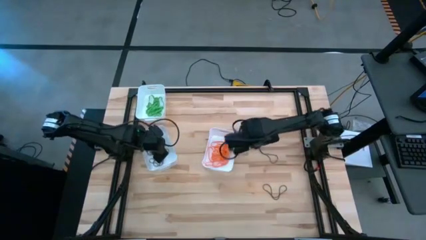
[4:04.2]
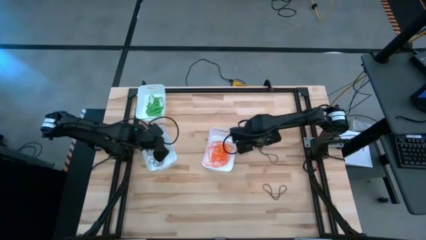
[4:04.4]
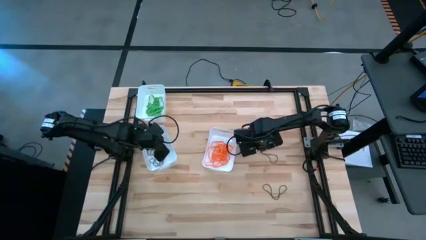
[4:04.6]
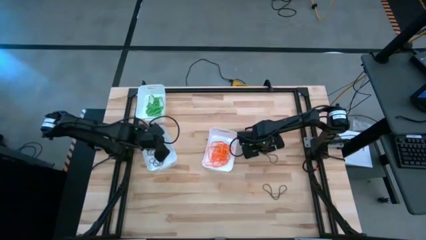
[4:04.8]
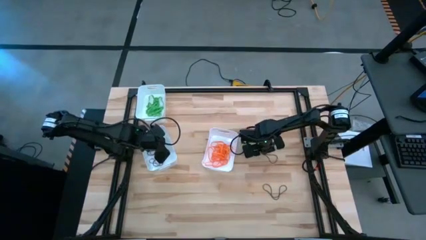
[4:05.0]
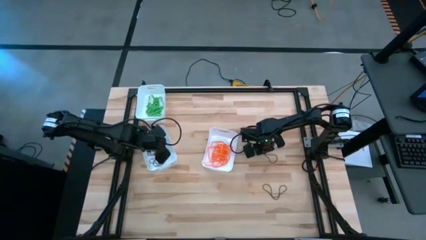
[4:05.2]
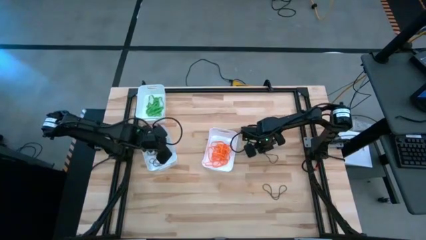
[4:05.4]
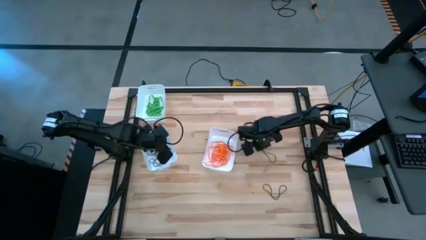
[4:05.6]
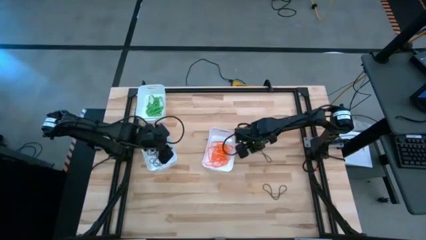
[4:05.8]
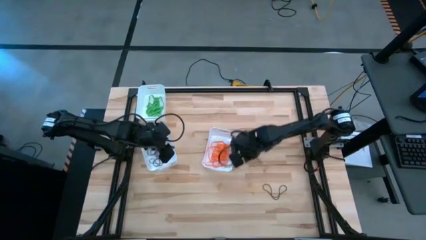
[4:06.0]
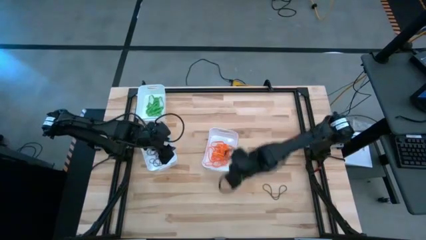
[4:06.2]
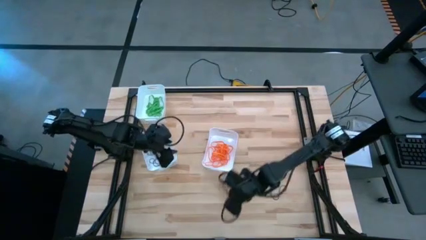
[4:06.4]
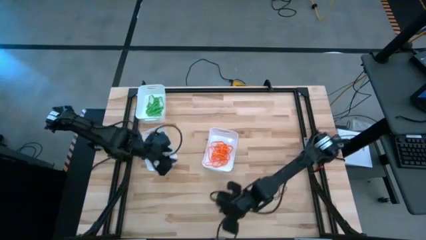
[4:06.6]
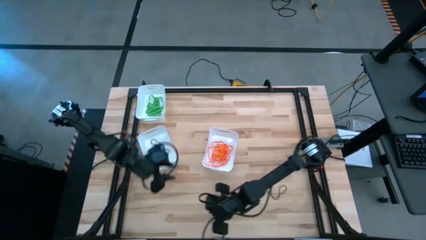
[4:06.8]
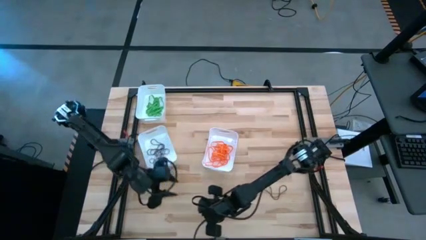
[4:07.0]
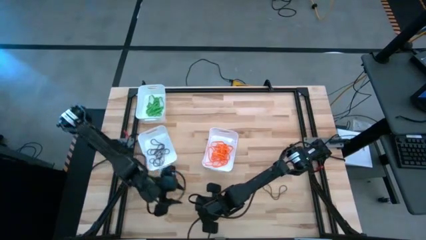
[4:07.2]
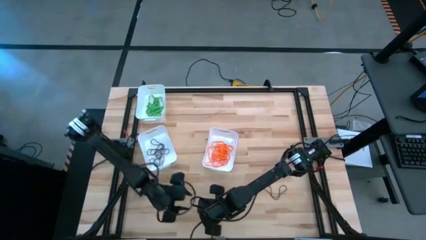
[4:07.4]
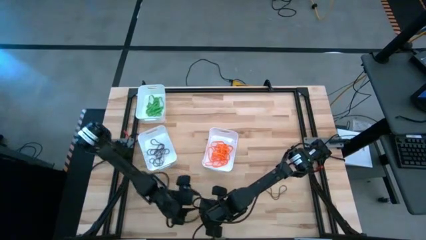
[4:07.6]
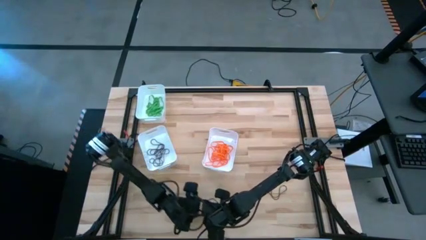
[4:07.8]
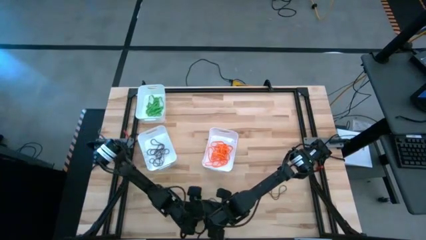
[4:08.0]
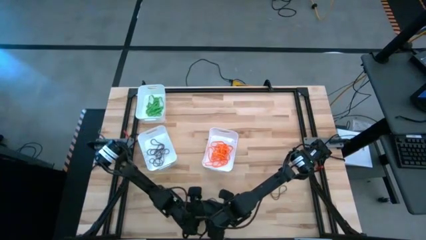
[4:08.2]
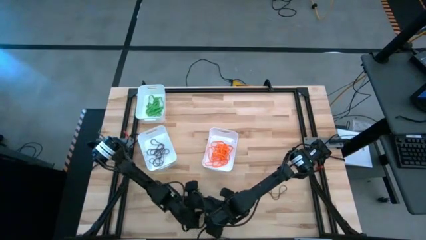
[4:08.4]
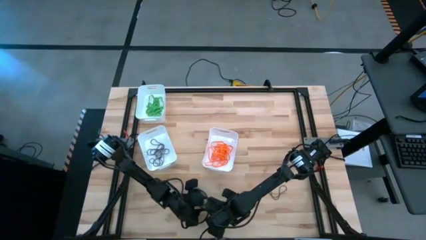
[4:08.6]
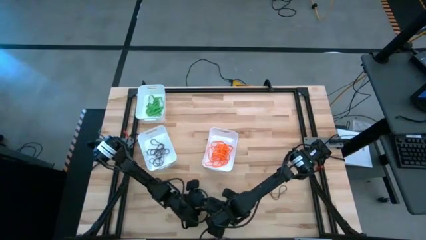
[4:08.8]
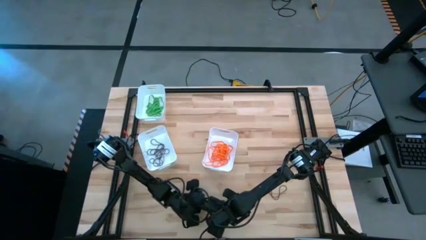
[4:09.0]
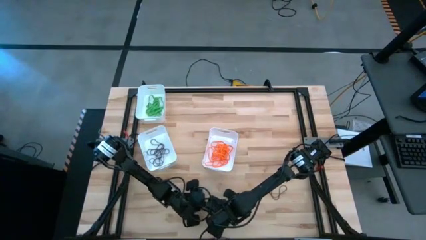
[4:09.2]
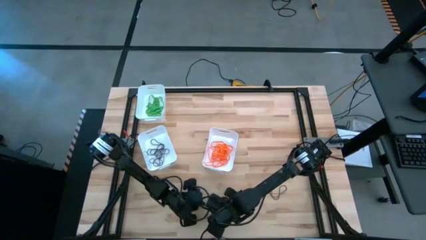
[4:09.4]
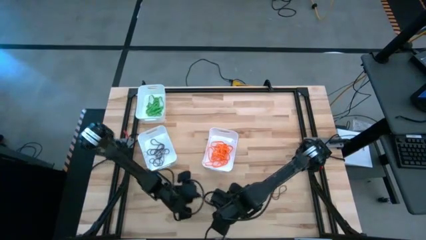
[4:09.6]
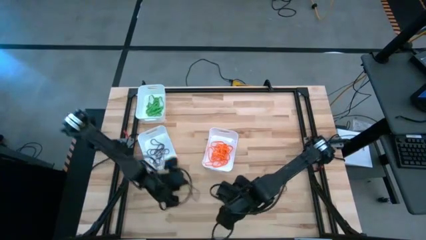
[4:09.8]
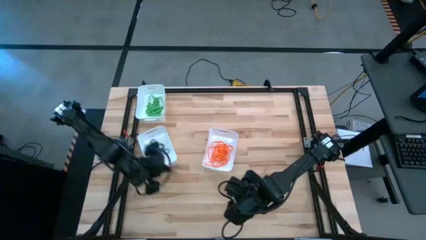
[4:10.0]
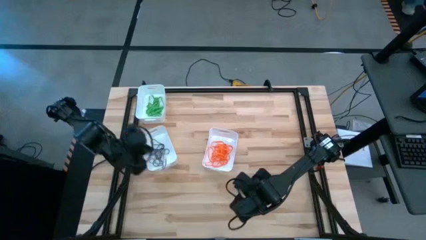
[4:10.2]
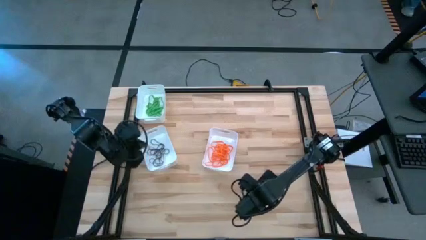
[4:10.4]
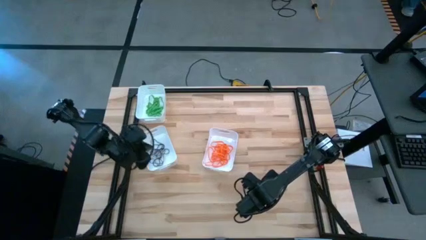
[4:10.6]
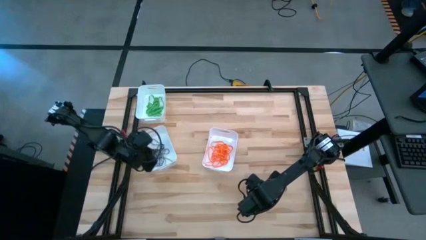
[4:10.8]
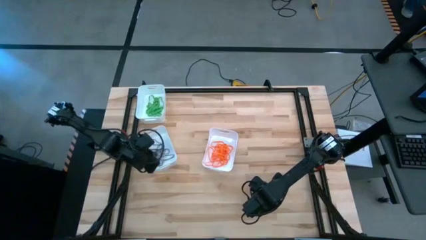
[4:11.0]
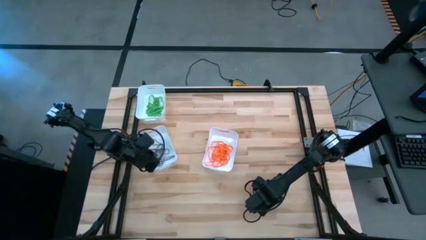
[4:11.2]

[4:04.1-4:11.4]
Task: Sort rubber bands into baskets
Put the violet rubber band into the bottom left white bin

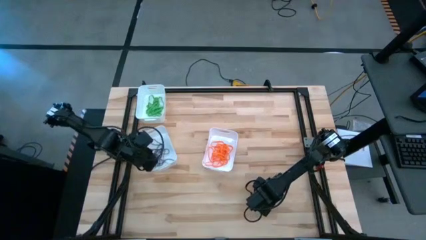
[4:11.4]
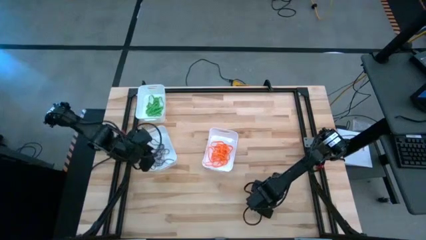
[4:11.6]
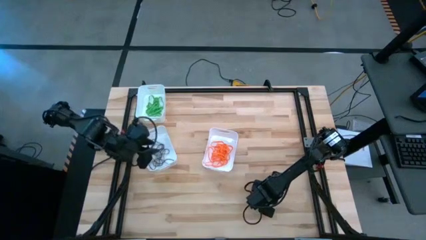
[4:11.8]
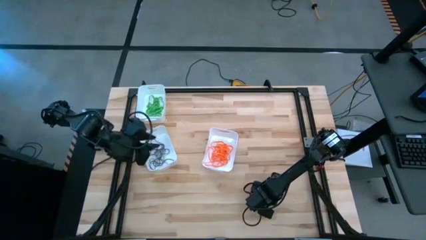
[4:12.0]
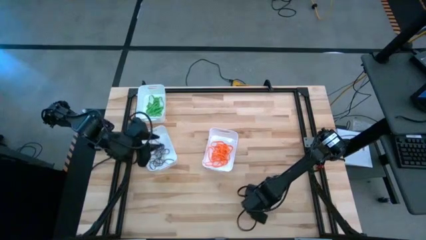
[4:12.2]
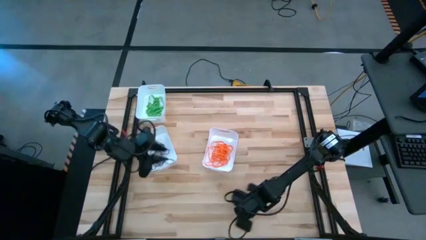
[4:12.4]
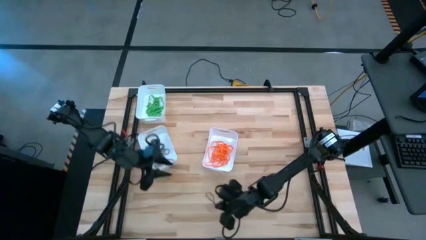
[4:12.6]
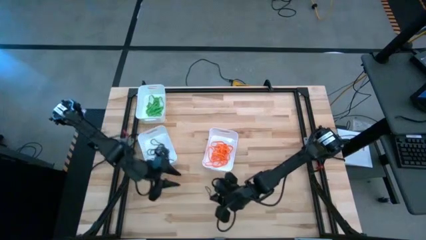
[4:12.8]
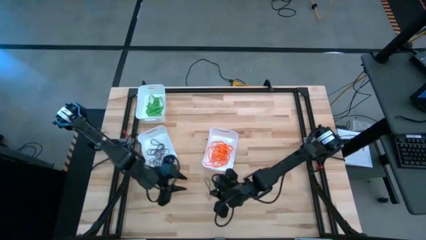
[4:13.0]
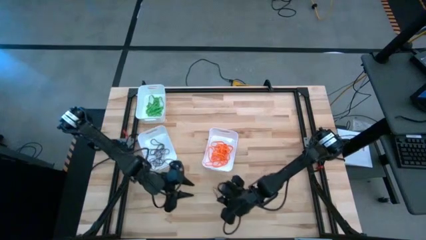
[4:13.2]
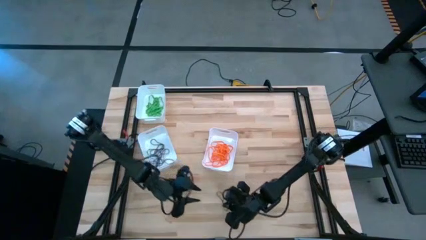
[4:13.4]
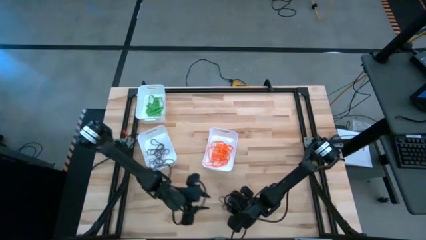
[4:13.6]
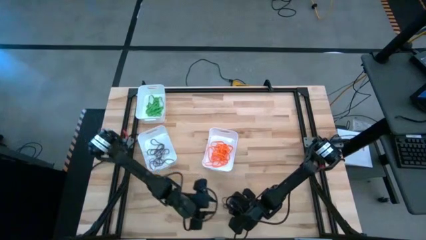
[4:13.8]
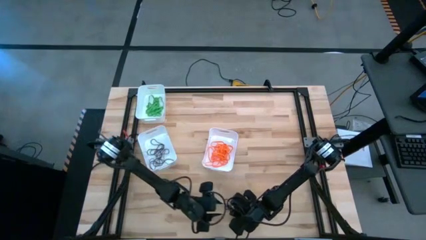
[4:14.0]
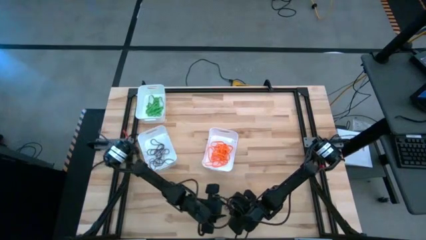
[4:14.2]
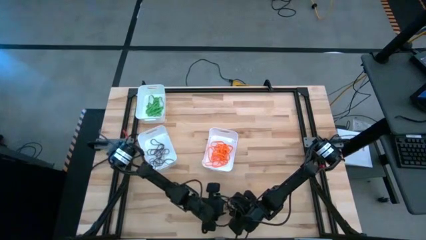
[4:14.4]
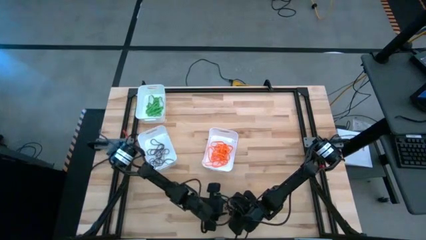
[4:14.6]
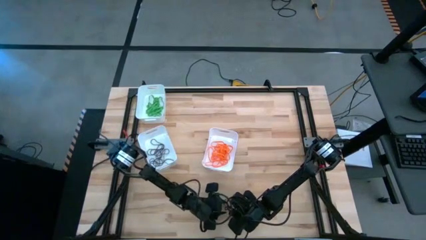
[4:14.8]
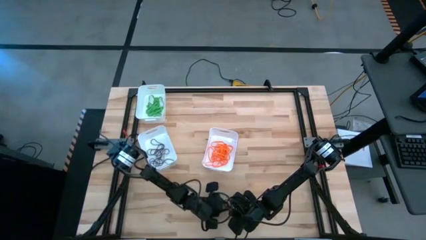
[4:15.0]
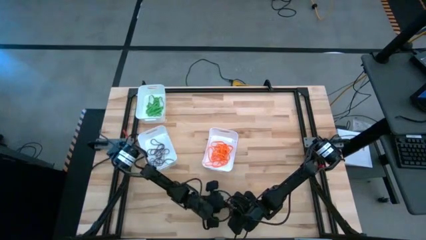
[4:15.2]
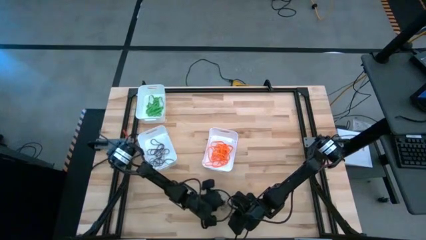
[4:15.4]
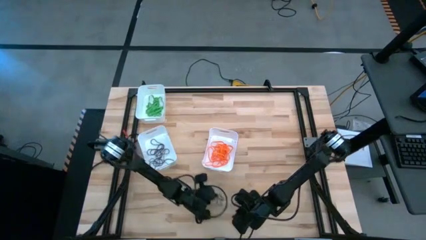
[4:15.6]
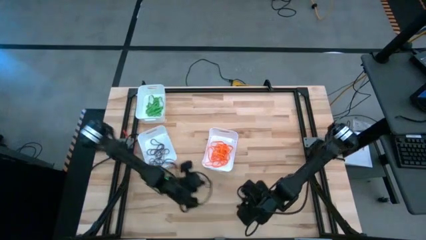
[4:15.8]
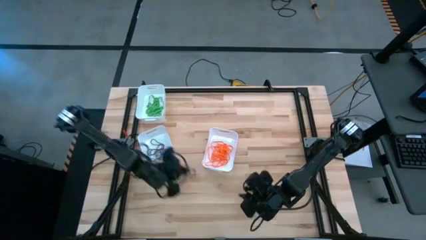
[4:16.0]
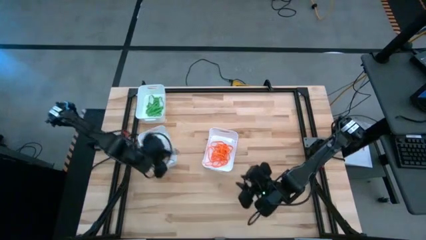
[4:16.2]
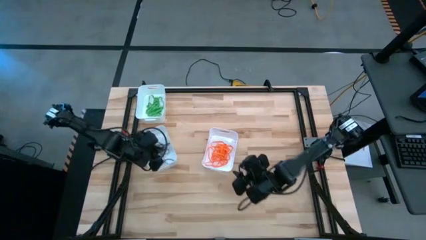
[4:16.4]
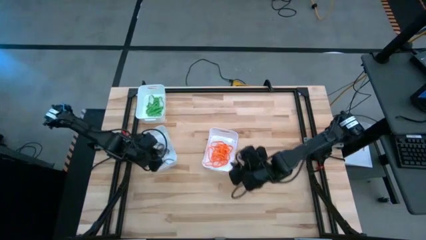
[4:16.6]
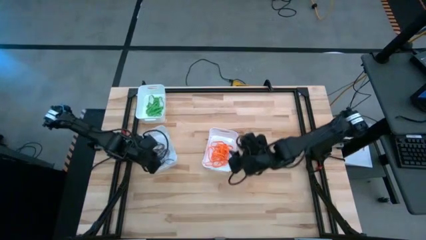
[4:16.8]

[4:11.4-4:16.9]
Put the violet rubber band into the bottom left white bin

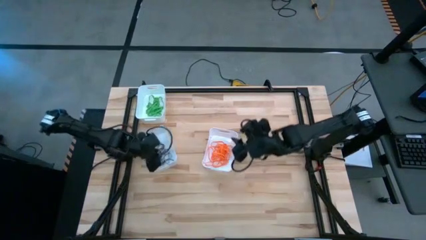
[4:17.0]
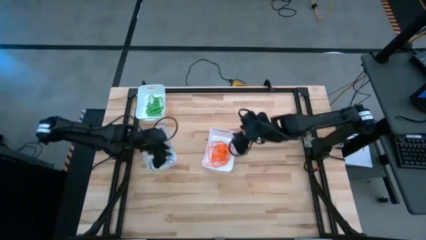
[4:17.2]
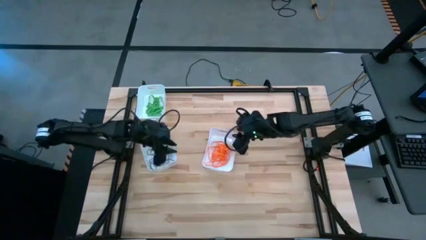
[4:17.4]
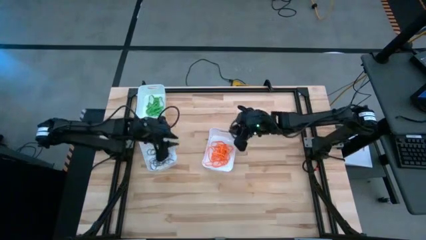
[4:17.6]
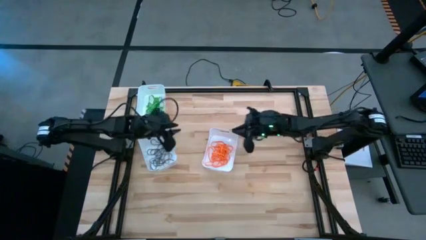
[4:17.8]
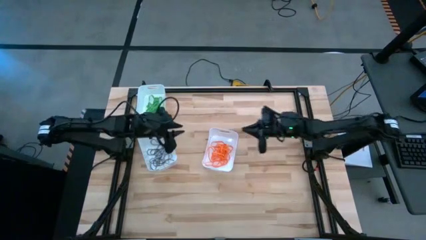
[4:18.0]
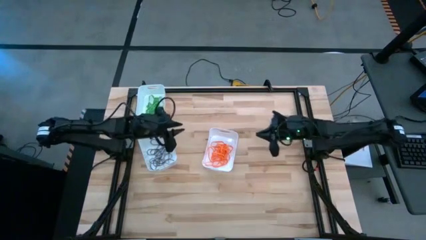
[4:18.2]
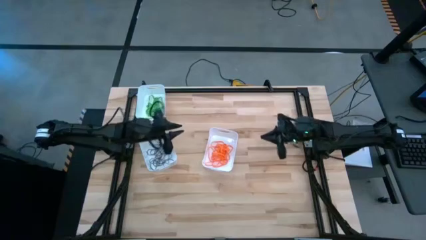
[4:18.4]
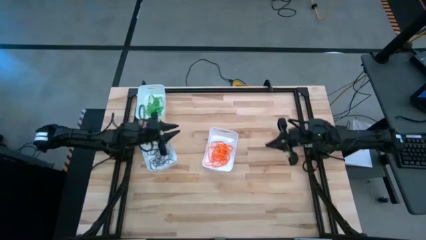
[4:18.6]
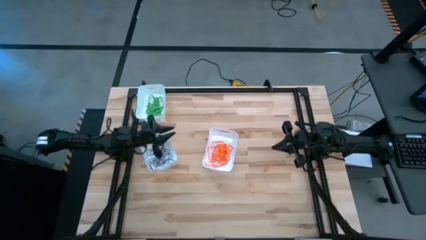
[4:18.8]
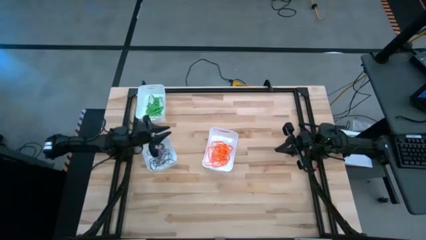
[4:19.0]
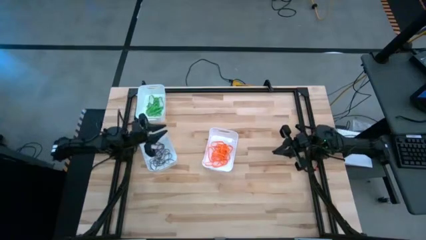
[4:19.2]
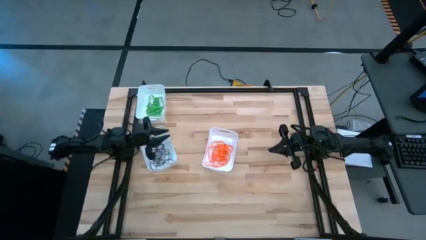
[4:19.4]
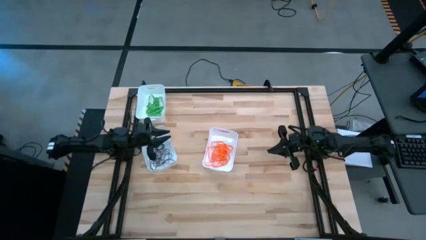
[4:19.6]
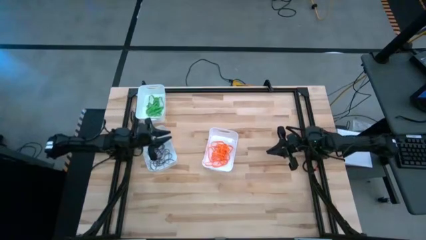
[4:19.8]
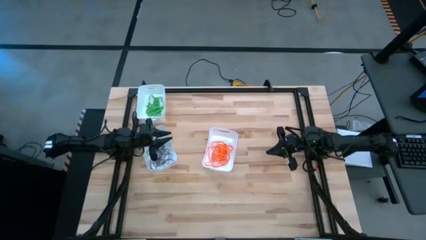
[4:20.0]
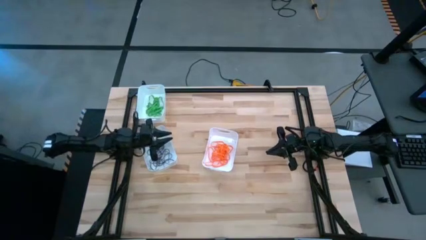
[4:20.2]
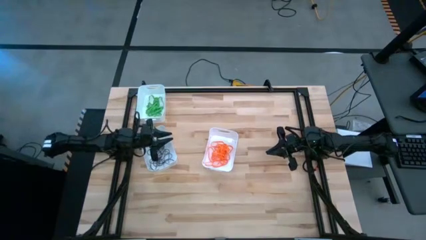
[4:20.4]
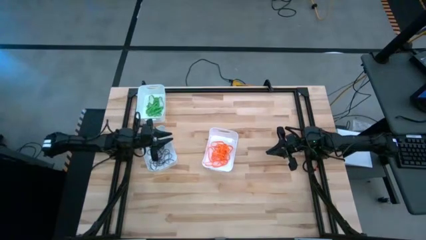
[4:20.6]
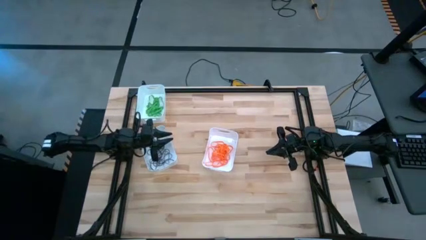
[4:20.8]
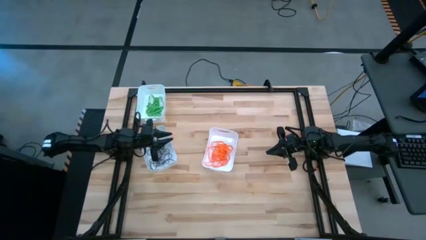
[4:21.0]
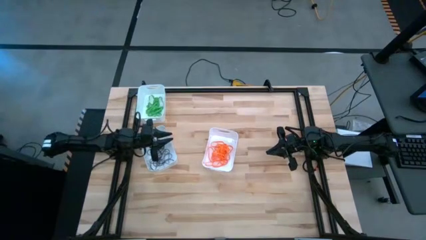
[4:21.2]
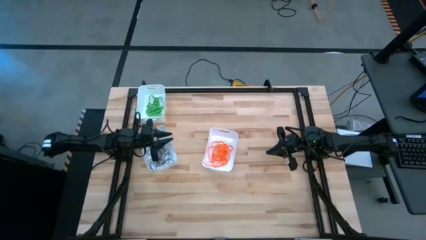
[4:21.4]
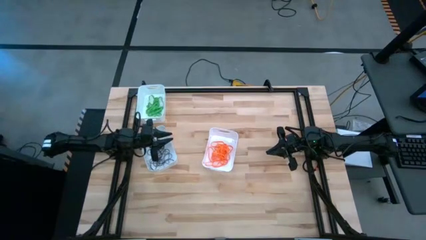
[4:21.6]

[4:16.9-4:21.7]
Return to Home Position
